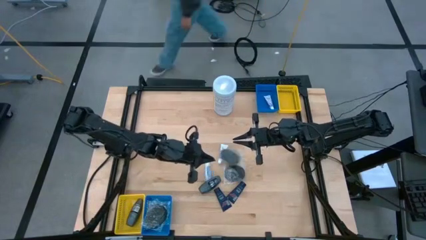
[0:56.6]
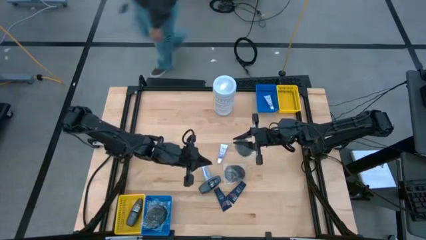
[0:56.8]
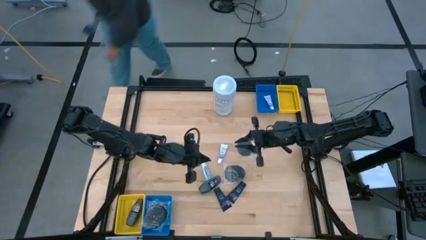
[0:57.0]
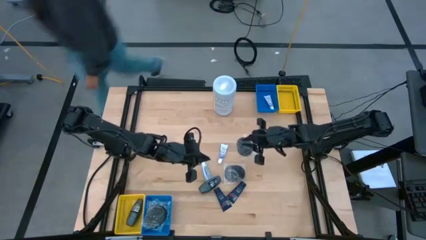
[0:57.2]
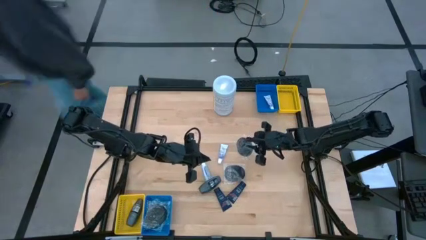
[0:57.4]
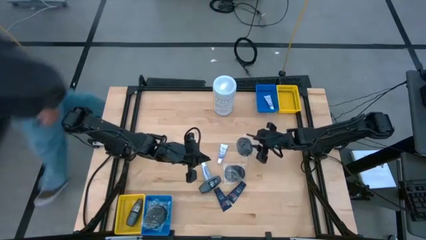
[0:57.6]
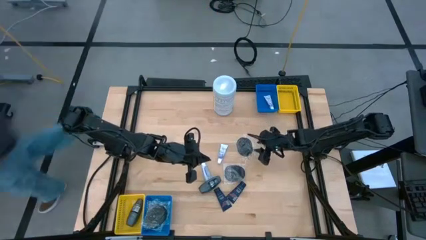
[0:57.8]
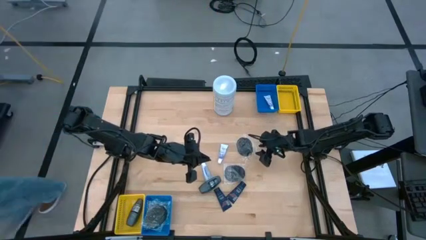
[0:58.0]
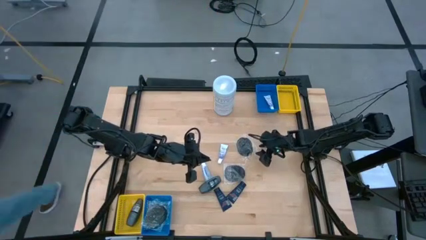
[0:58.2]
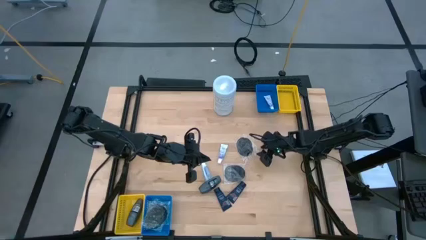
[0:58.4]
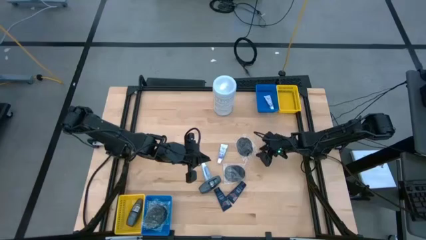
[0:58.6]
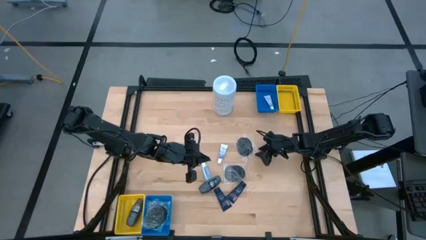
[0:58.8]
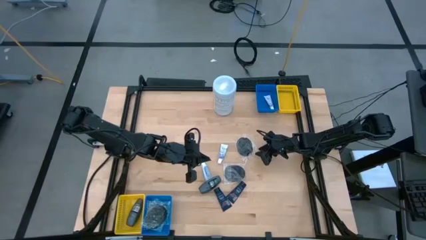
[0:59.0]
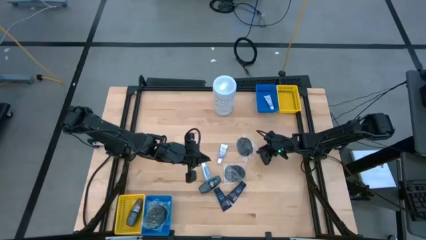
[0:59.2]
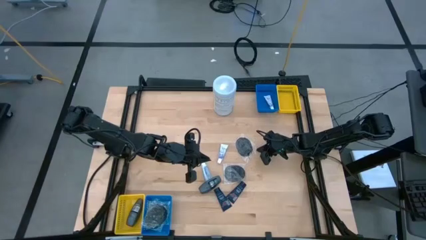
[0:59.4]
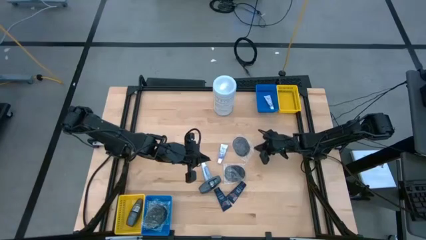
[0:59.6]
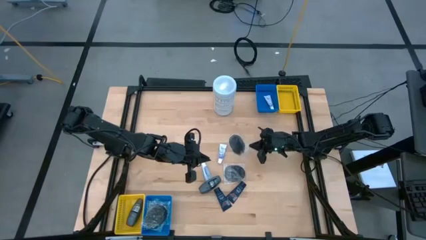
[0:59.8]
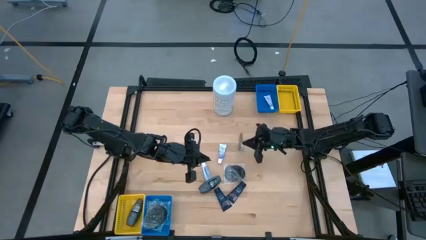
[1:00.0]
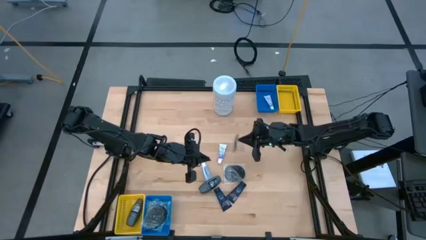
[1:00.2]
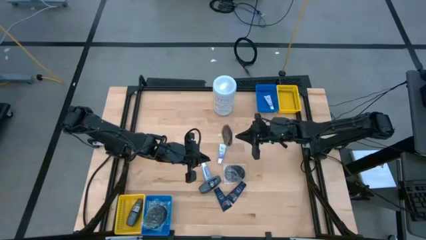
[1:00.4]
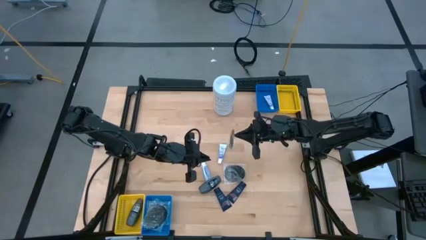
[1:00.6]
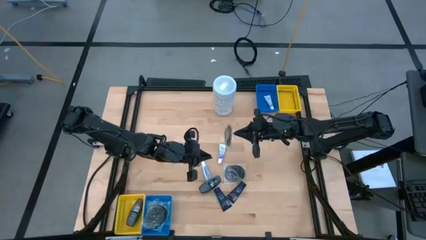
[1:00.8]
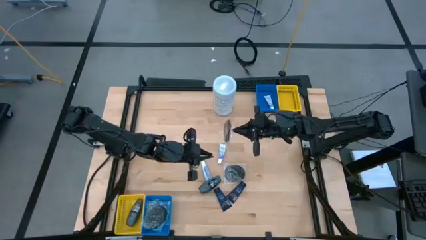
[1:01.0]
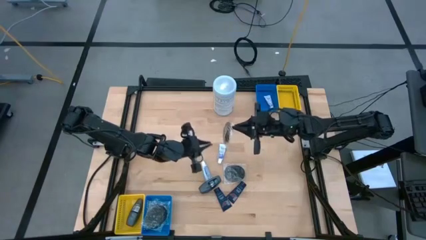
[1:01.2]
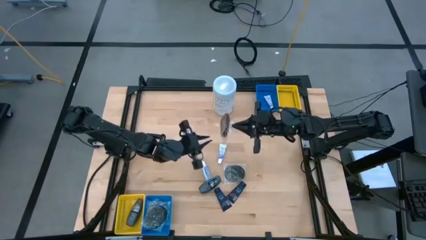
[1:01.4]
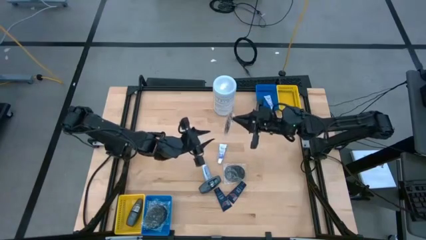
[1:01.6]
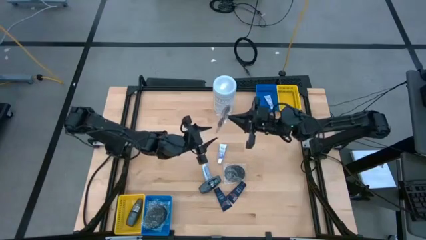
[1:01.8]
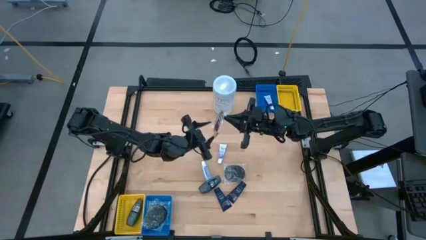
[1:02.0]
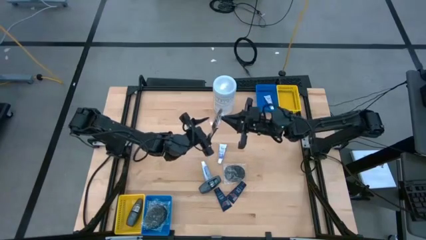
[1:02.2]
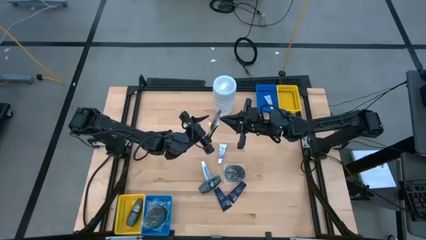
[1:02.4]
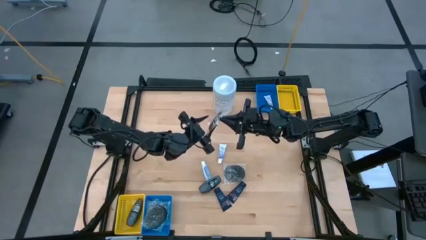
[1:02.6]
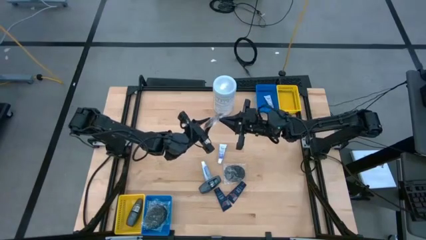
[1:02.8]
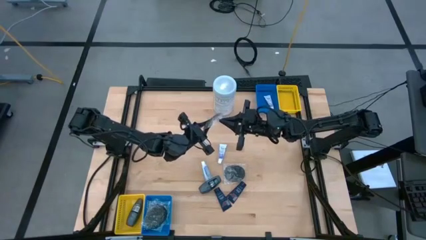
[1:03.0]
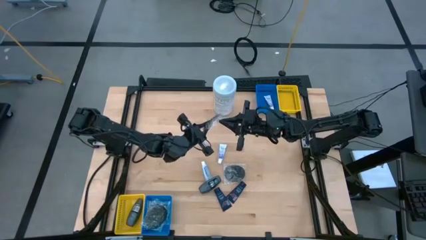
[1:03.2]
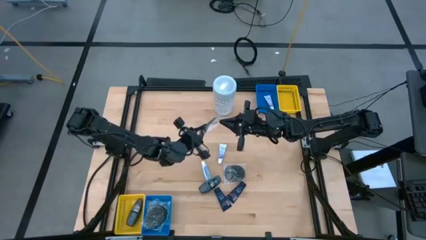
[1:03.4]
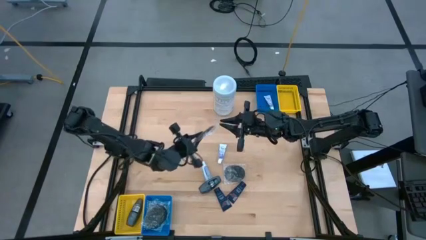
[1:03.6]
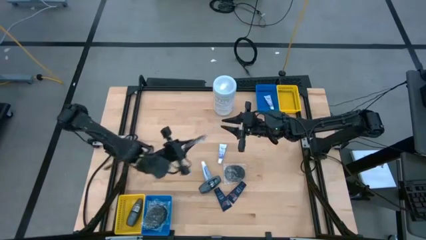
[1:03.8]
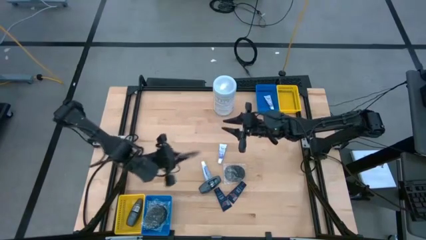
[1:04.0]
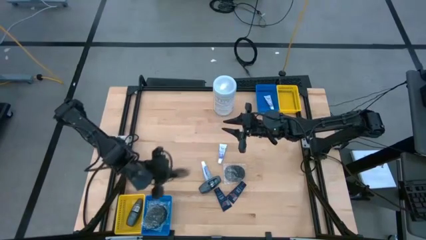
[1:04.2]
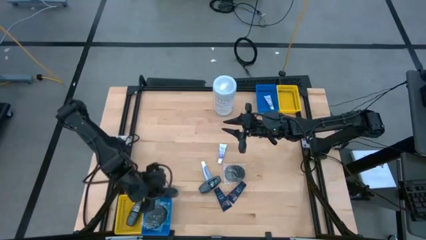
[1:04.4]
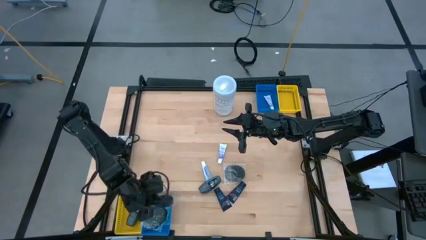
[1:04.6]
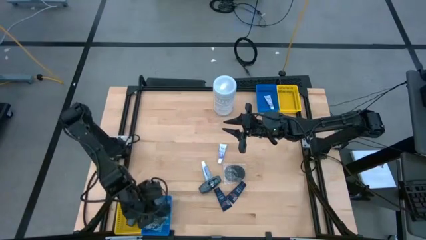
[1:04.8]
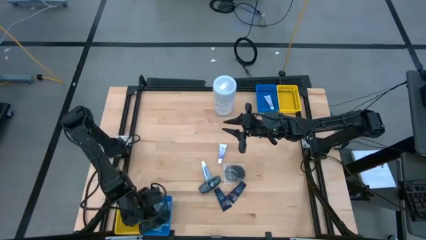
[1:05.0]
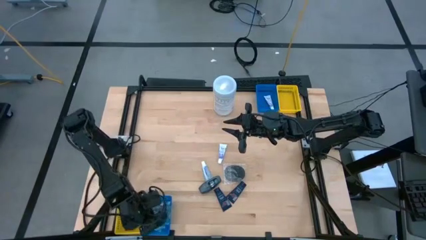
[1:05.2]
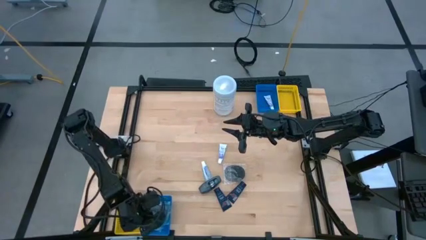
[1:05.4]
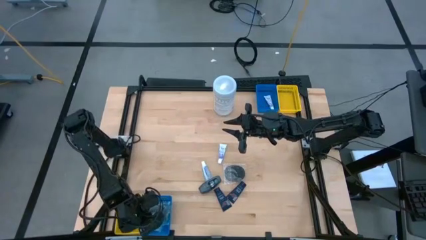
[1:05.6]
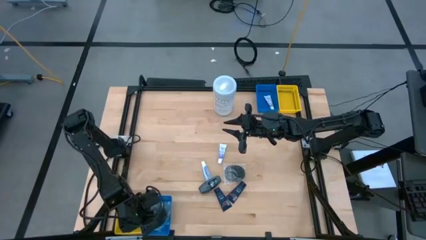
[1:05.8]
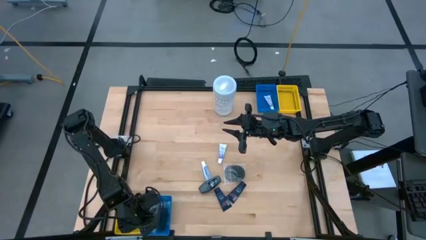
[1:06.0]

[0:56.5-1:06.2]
Task: Pick & Place Travel size toiletries
Put the black hairbrush into the bottom blue bin
